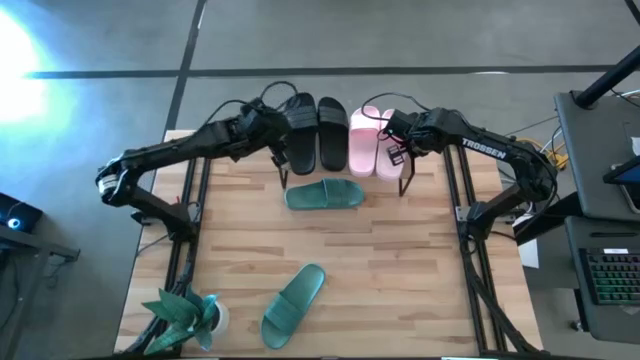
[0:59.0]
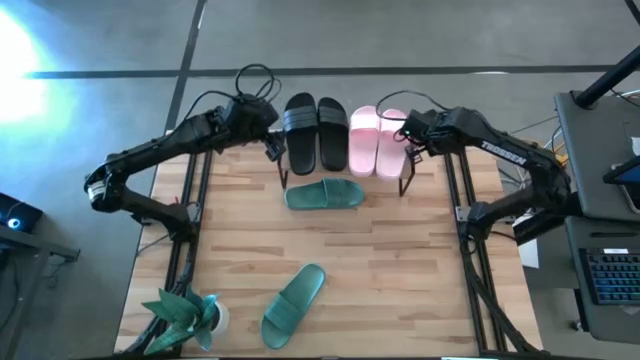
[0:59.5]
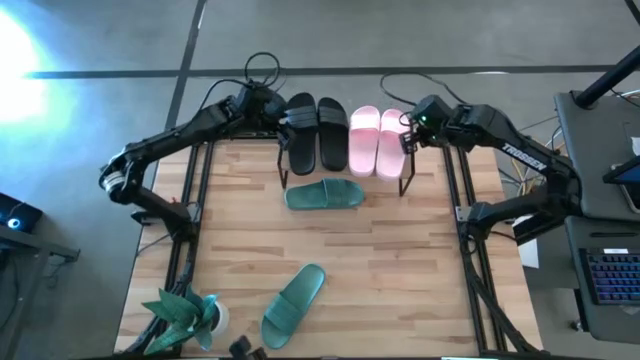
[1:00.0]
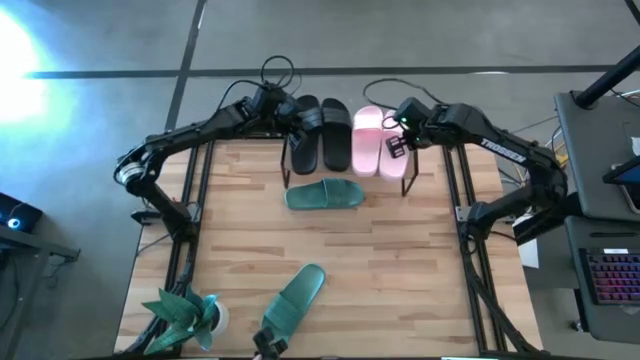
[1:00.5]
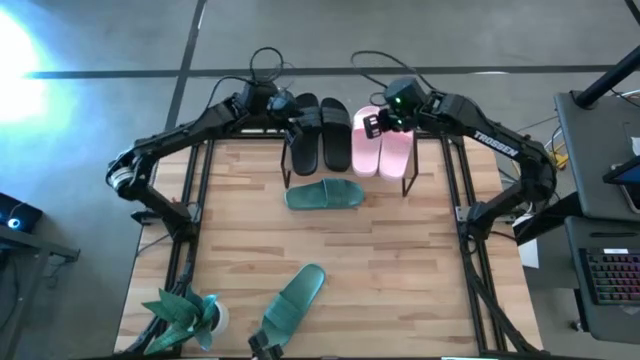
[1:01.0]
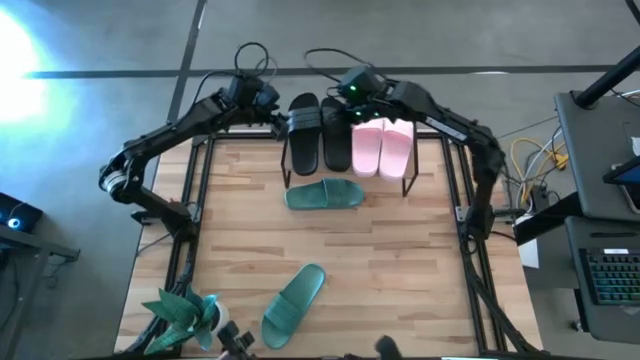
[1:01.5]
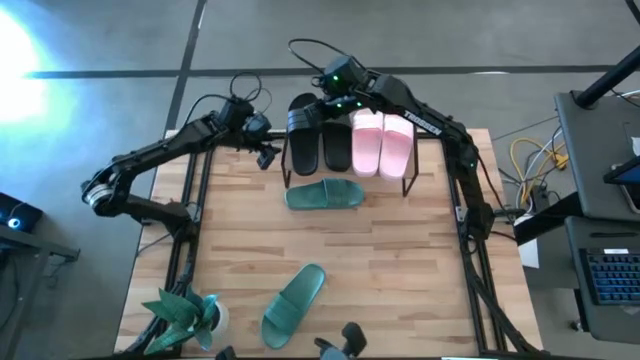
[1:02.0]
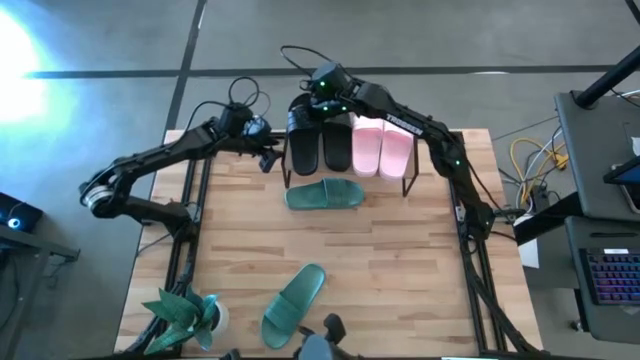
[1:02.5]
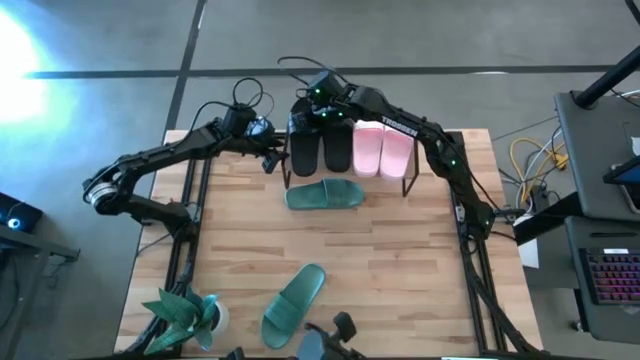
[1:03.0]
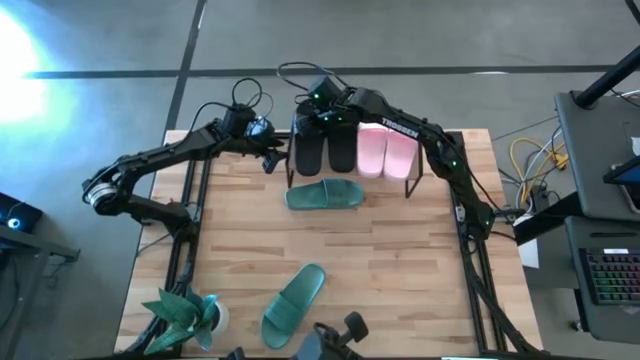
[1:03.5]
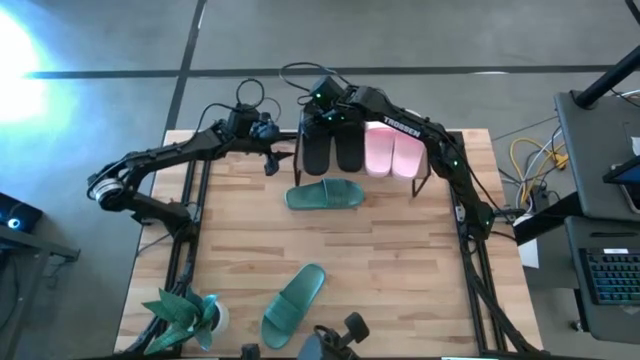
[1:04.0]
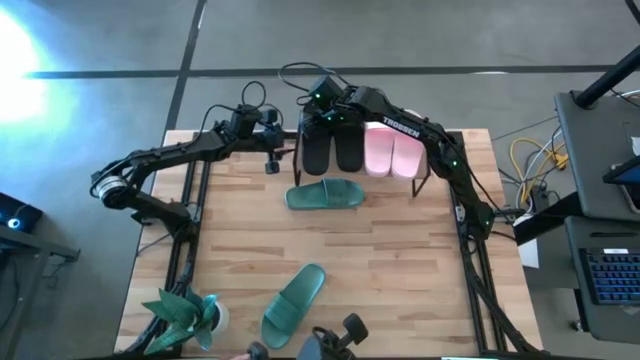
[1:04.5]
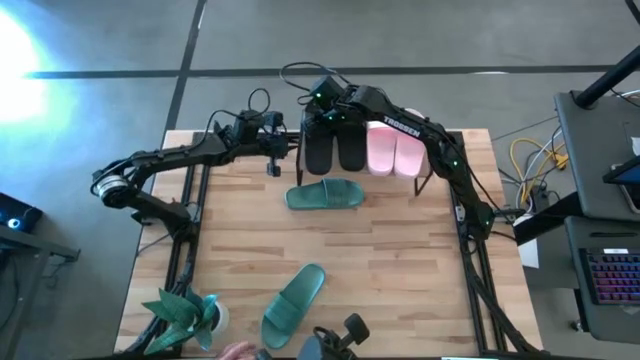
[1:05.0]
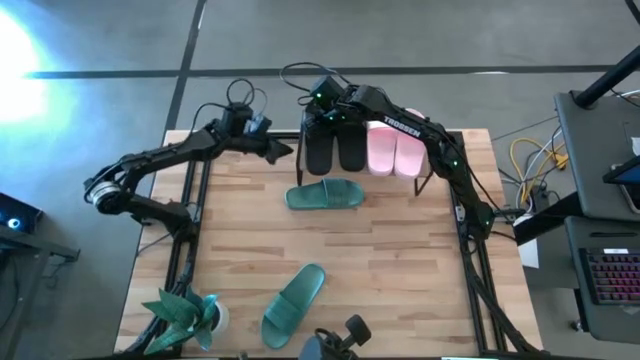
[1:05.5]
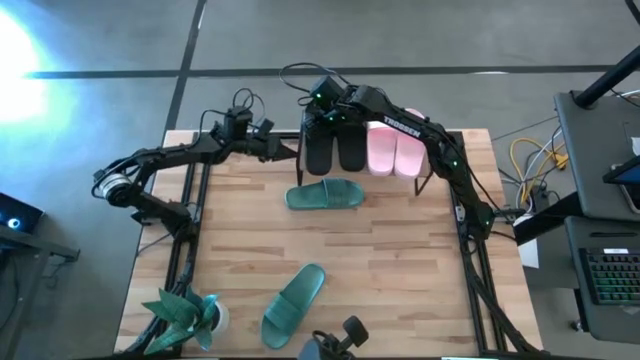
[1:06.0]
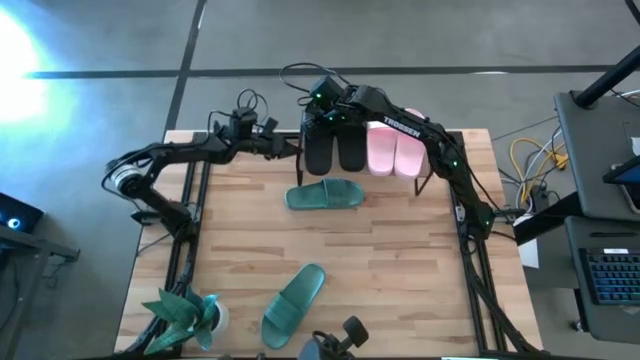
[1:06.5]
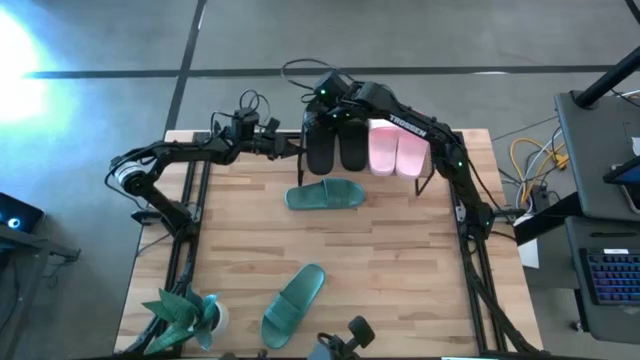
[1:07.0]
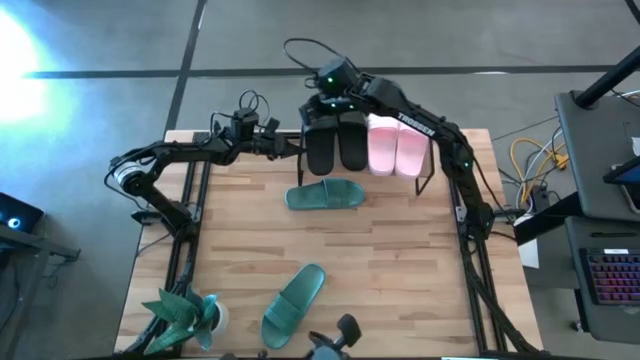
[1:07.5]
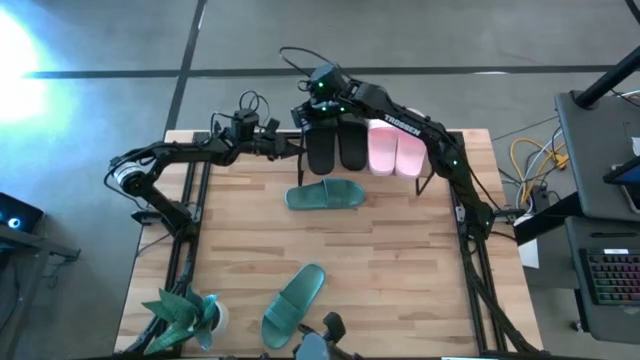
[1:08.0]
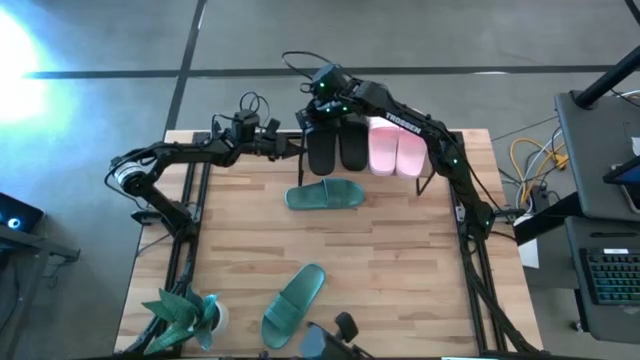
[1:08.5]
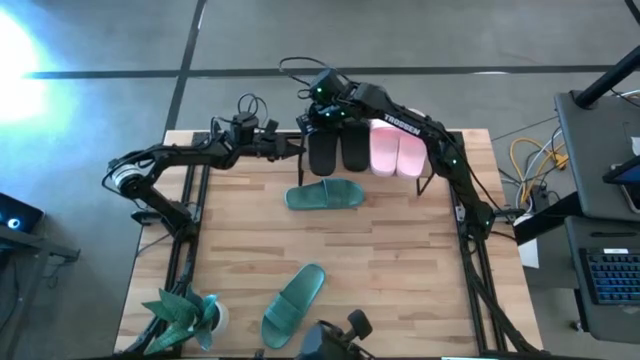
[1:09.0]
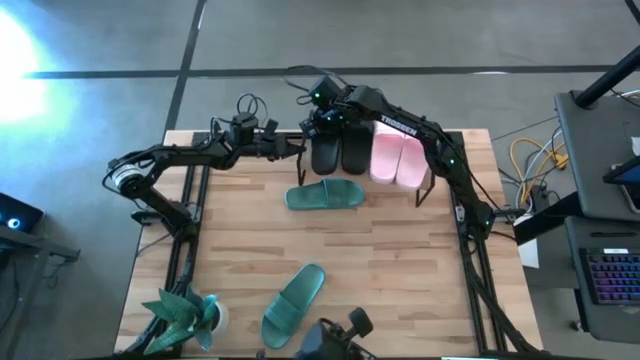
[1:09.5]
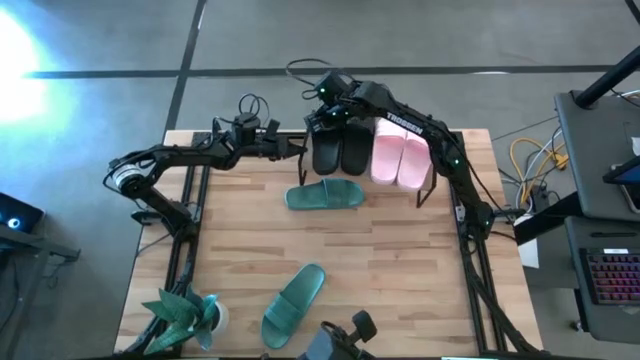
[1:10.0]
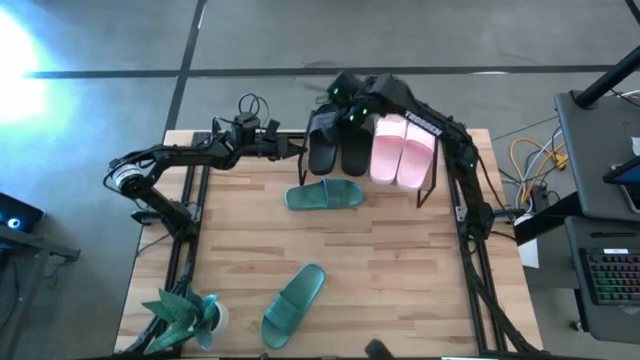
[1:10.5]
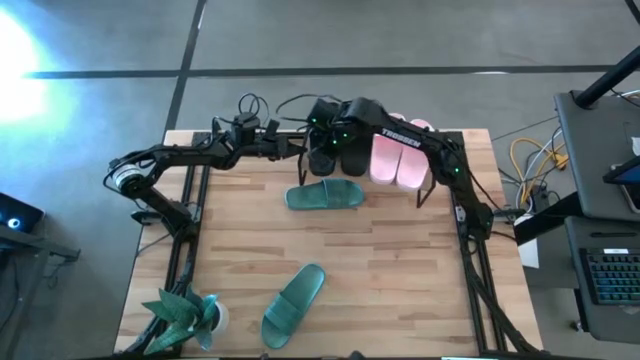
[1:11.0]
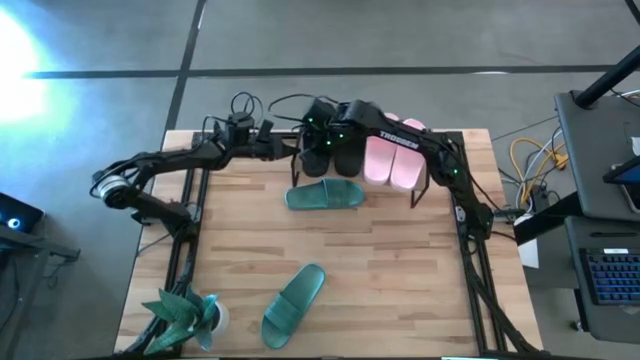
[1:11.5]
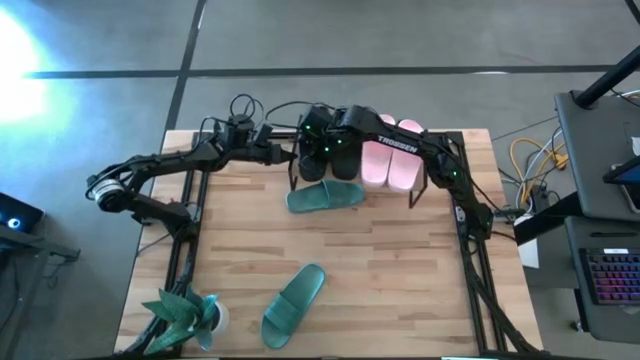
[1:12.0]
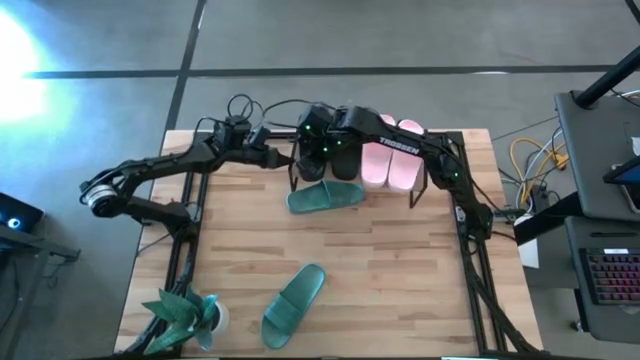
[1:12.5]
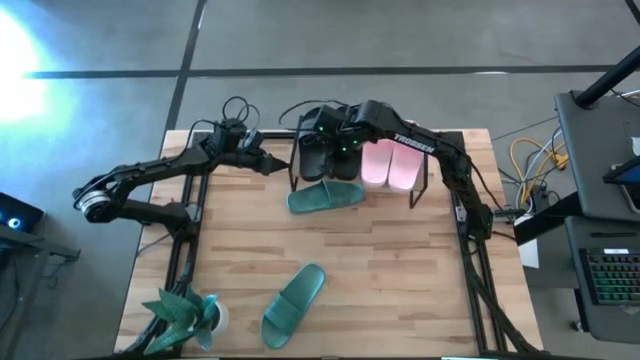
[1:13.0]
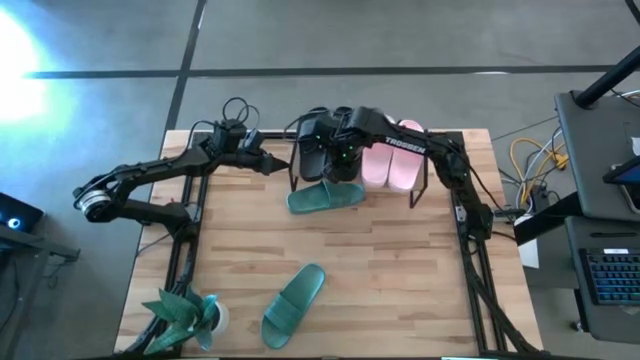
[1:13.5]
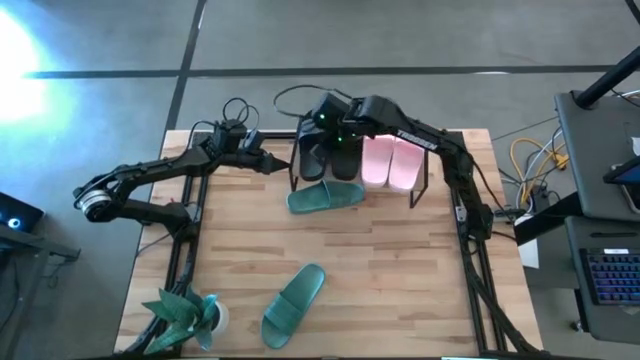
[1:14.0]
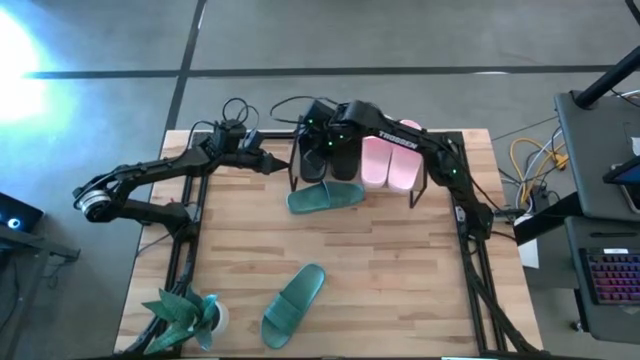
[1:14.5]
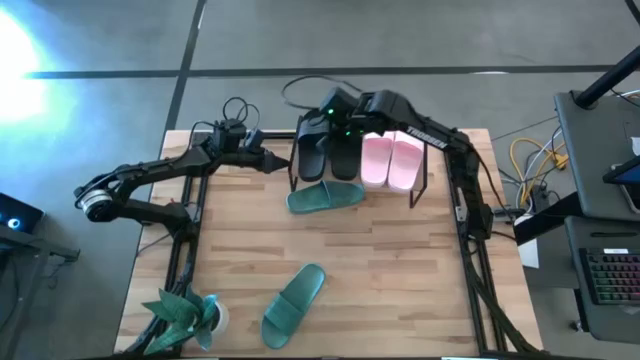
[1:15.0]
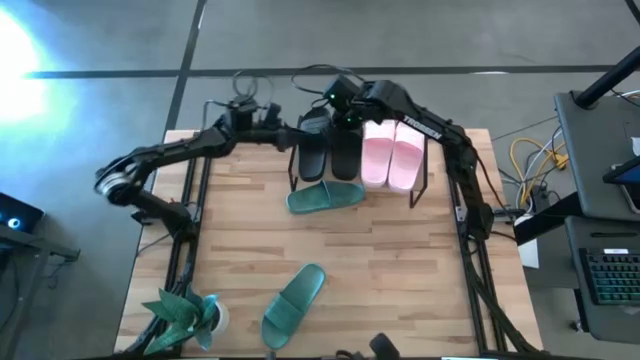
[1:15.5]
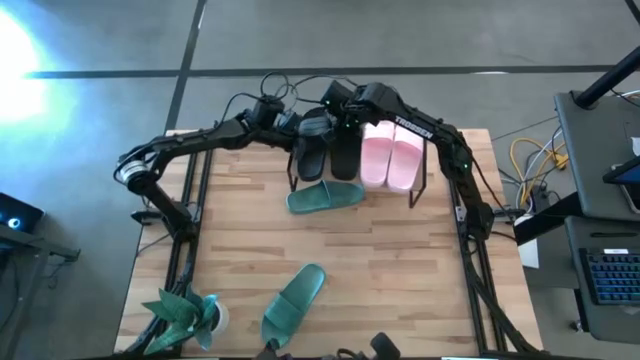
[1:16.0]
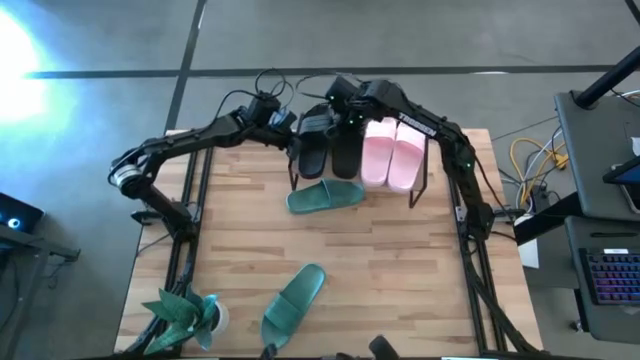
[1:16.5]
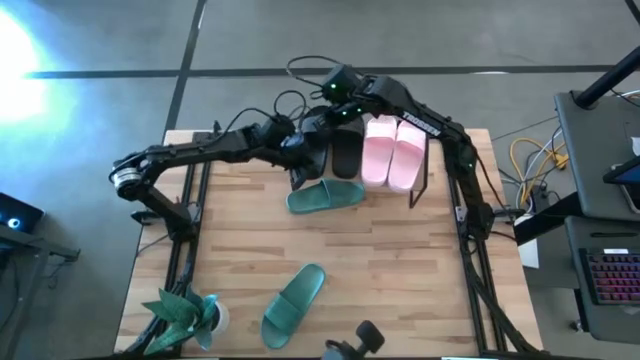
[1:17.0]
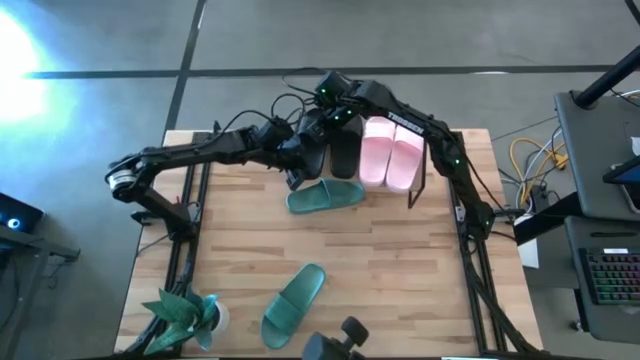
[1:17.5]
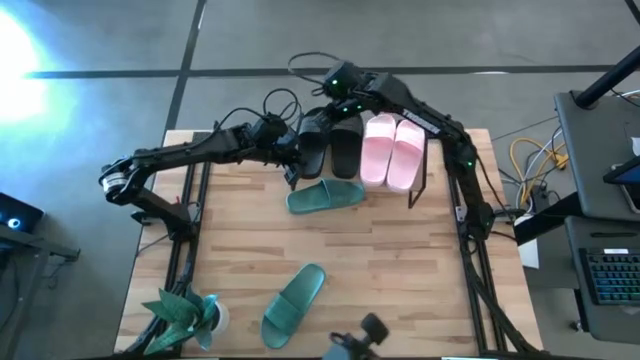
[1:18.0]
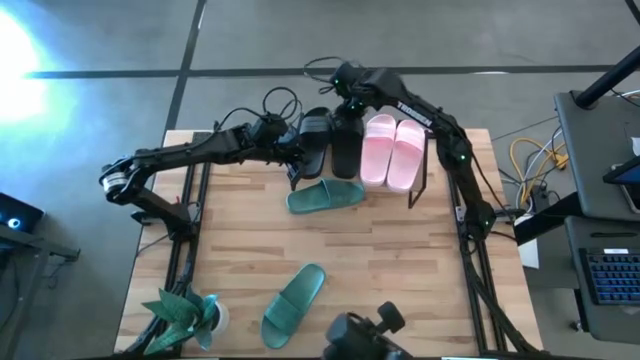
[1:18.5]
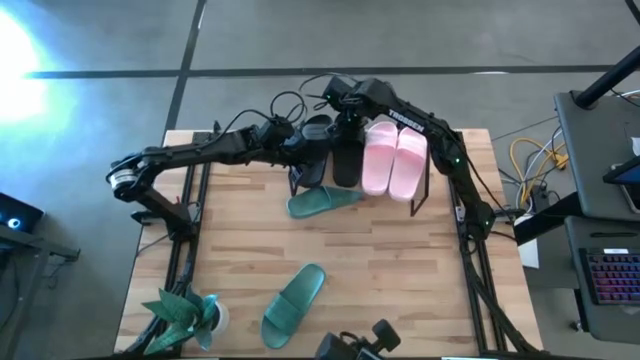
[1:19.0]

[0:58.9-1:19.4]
Task: Pick and place slides into the shelf
Adjust the shelf
